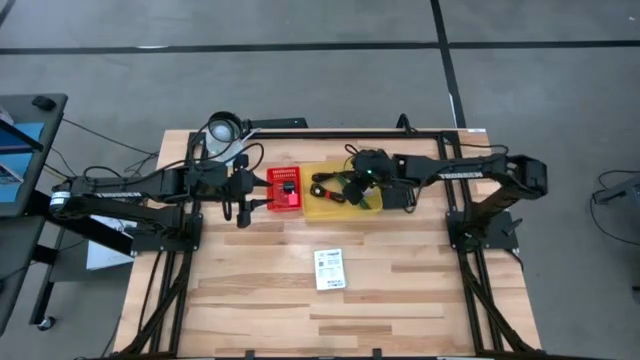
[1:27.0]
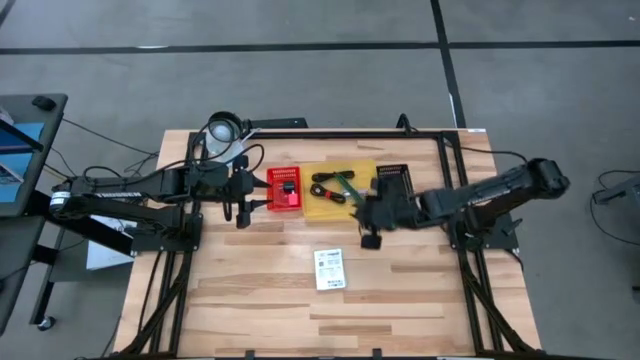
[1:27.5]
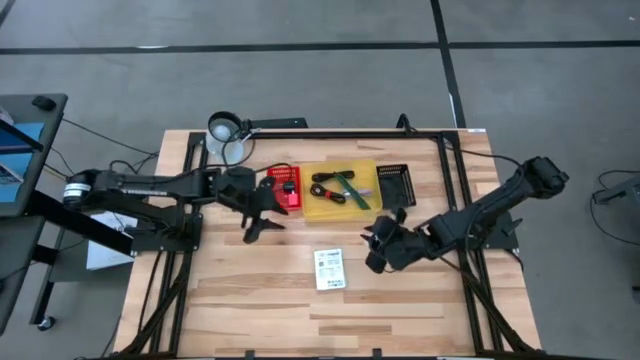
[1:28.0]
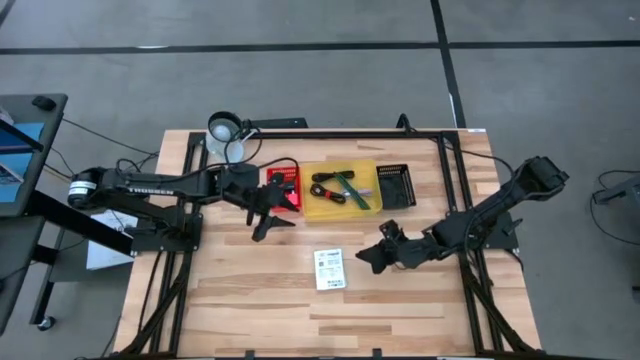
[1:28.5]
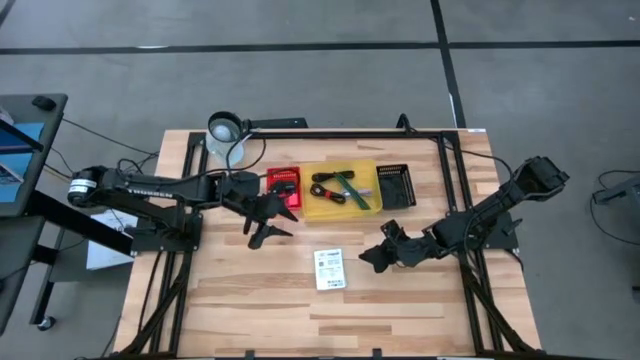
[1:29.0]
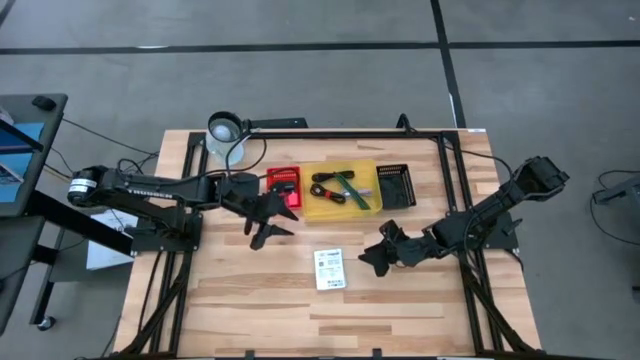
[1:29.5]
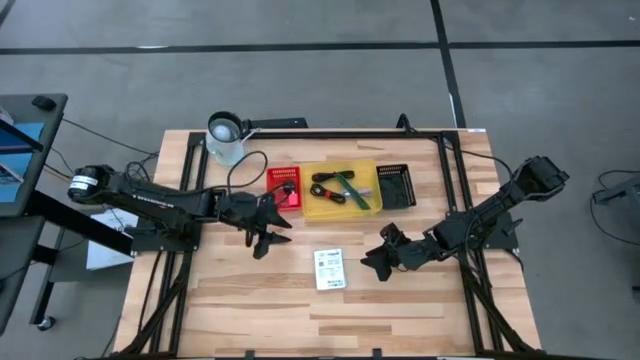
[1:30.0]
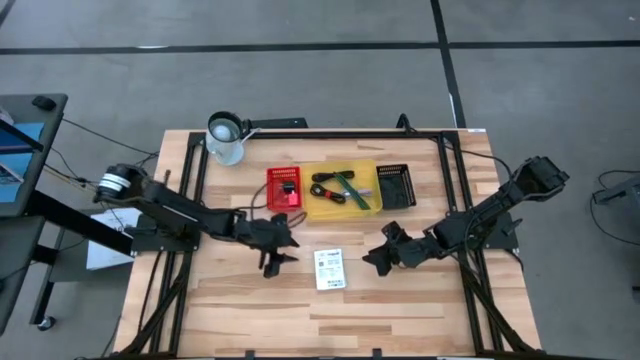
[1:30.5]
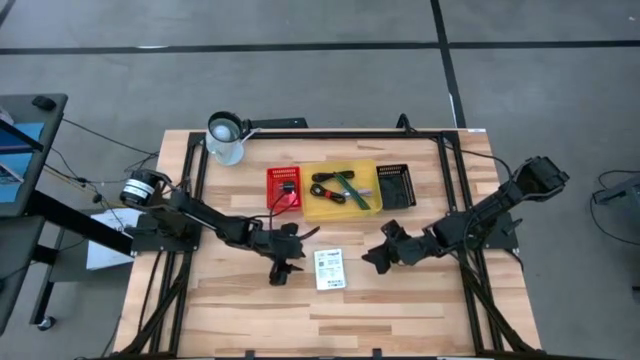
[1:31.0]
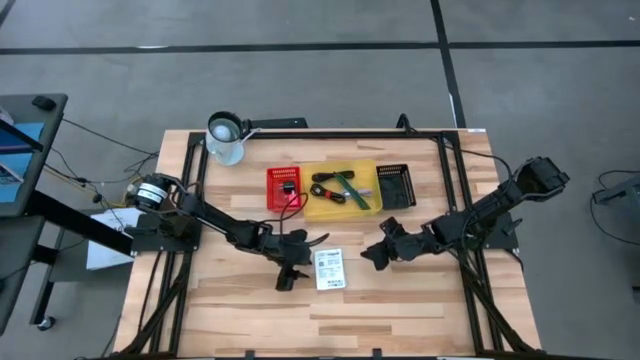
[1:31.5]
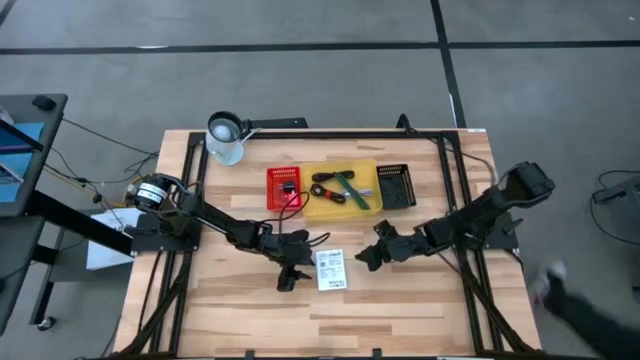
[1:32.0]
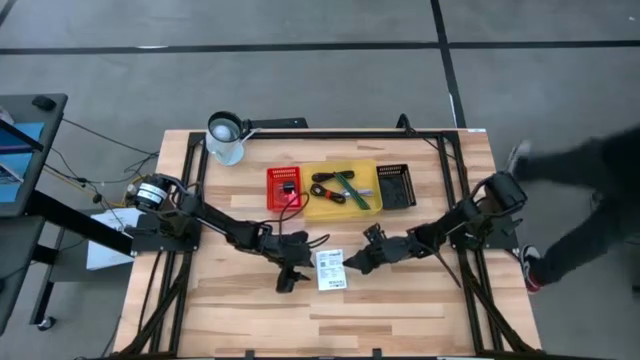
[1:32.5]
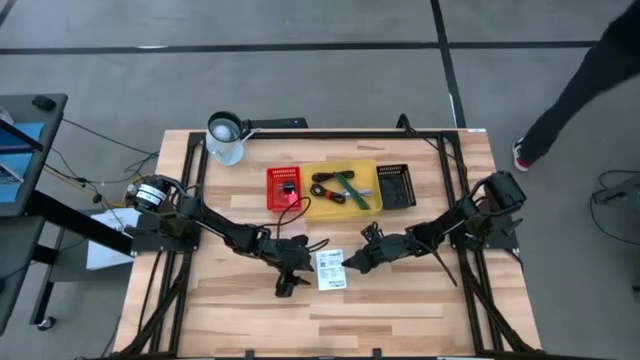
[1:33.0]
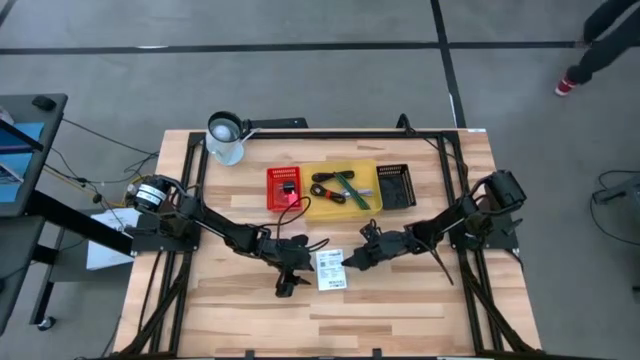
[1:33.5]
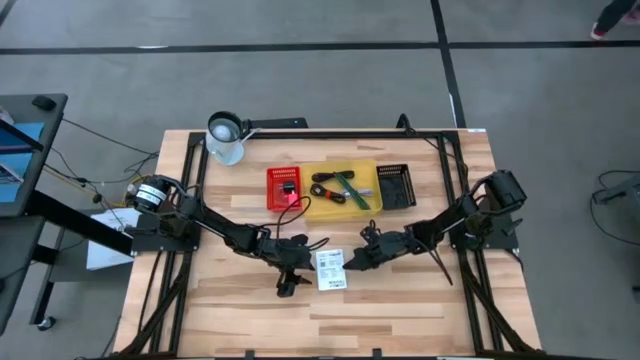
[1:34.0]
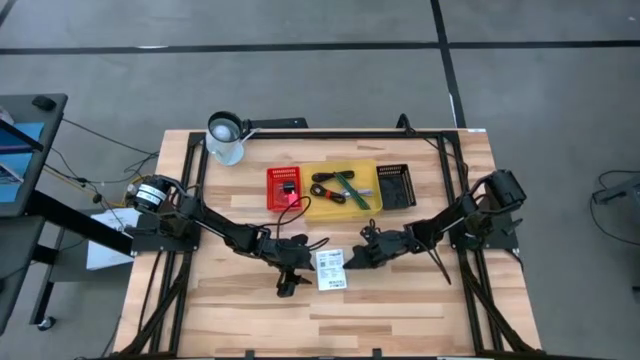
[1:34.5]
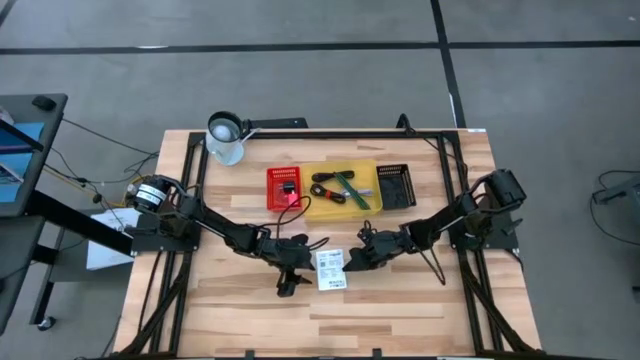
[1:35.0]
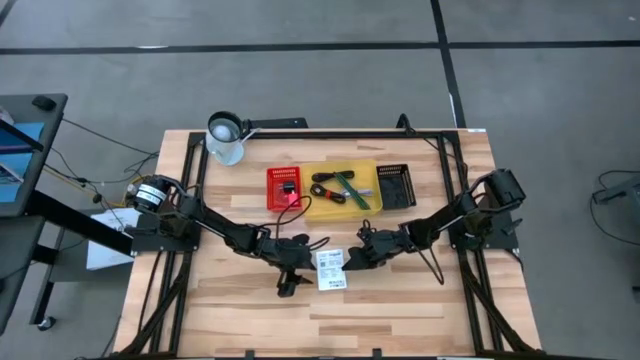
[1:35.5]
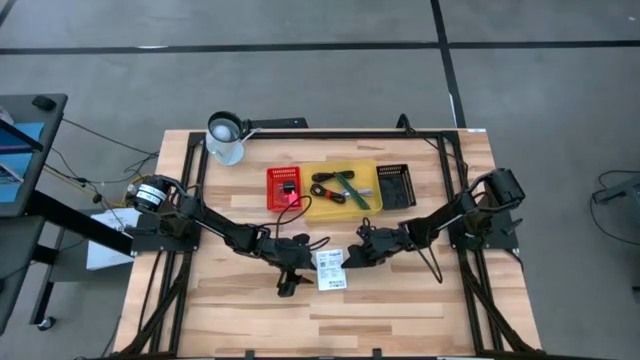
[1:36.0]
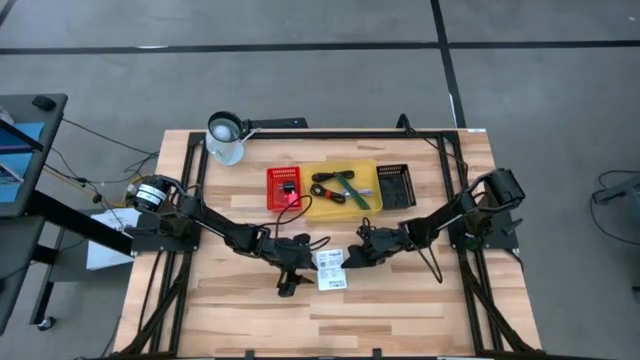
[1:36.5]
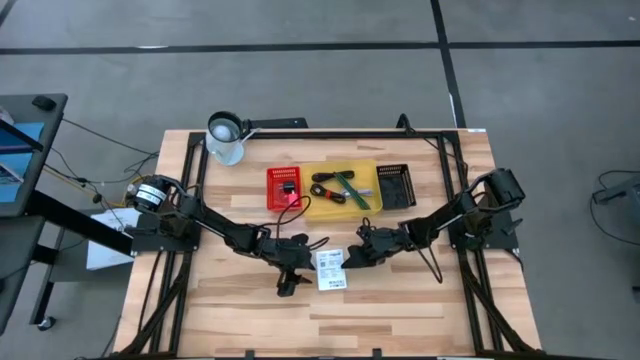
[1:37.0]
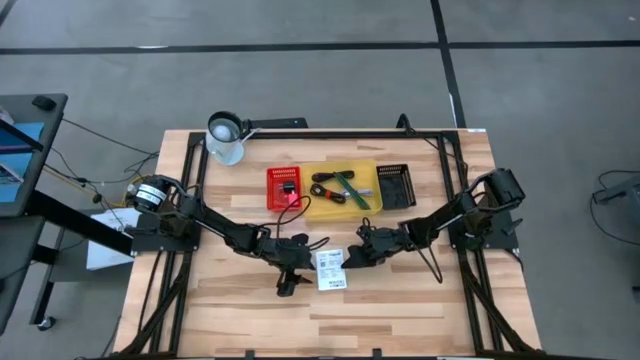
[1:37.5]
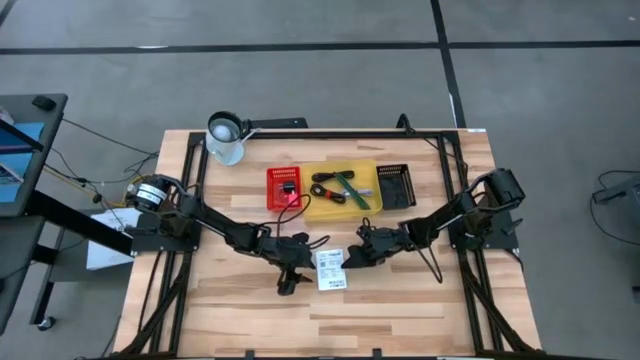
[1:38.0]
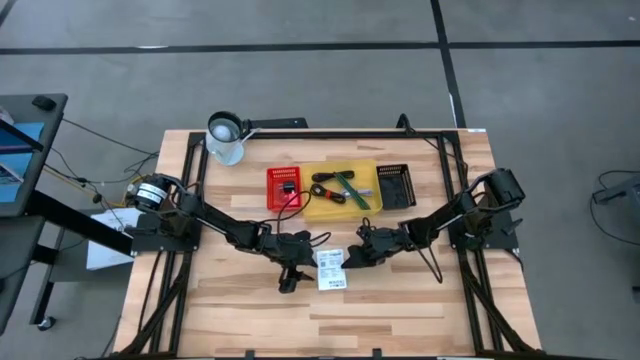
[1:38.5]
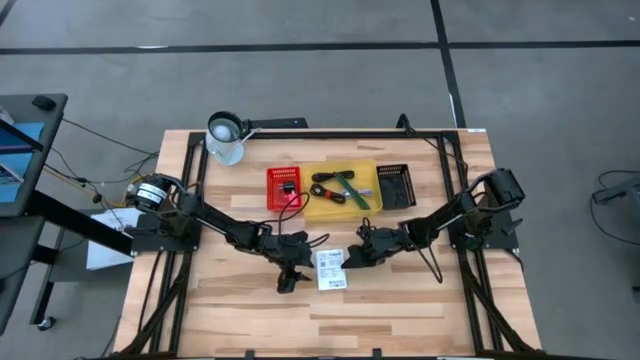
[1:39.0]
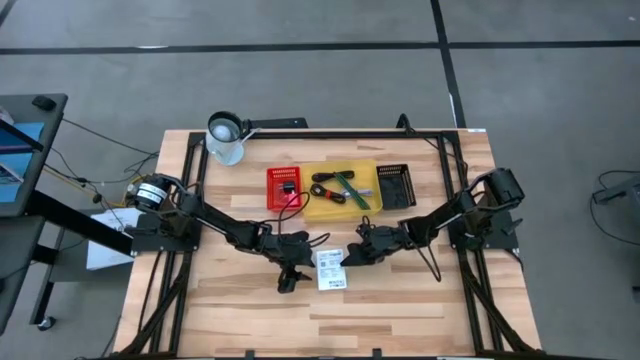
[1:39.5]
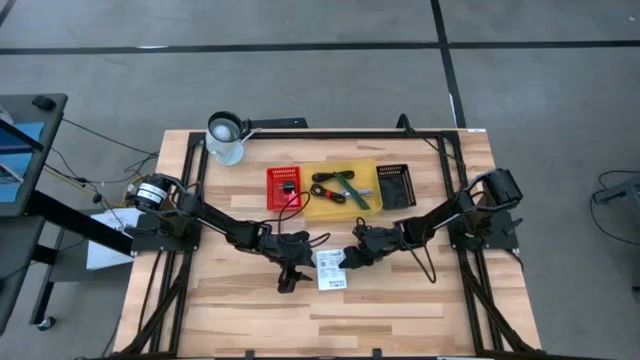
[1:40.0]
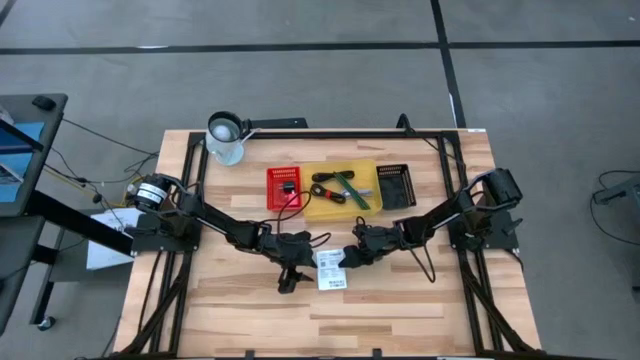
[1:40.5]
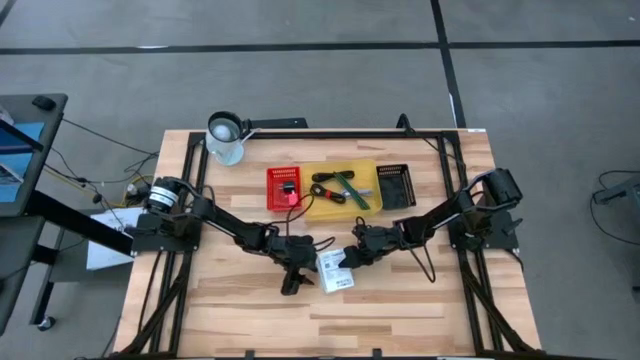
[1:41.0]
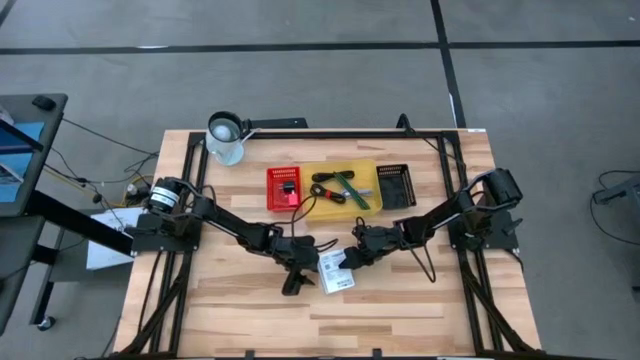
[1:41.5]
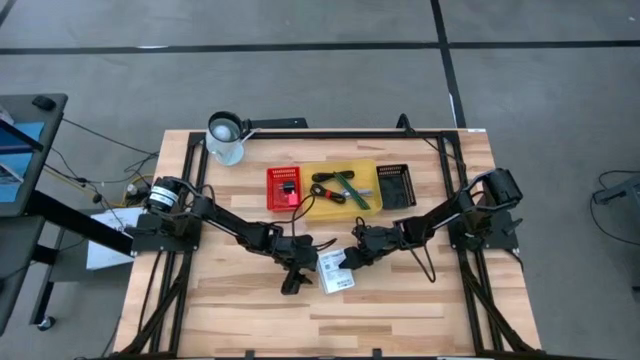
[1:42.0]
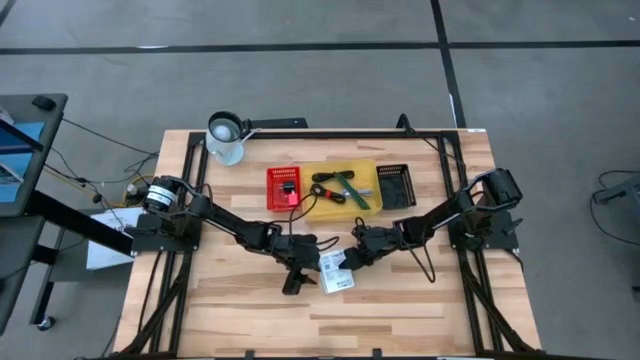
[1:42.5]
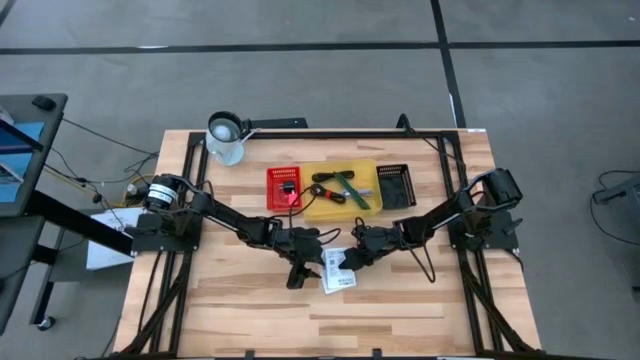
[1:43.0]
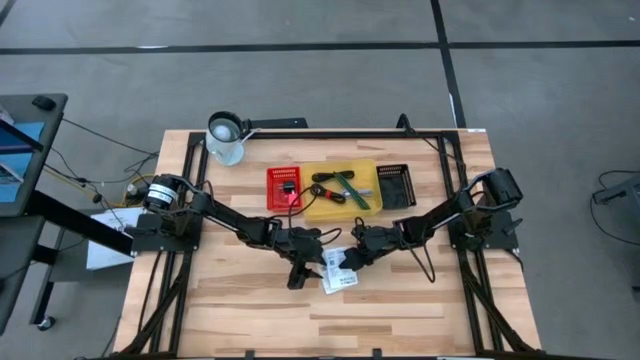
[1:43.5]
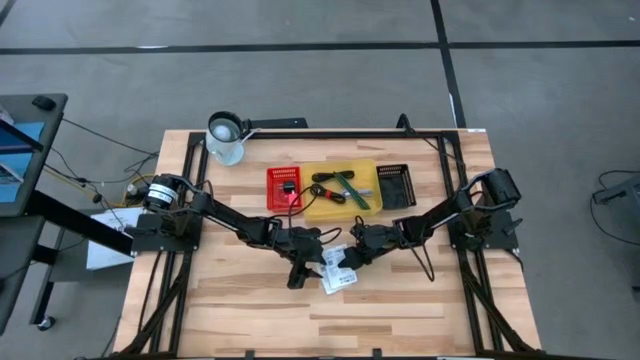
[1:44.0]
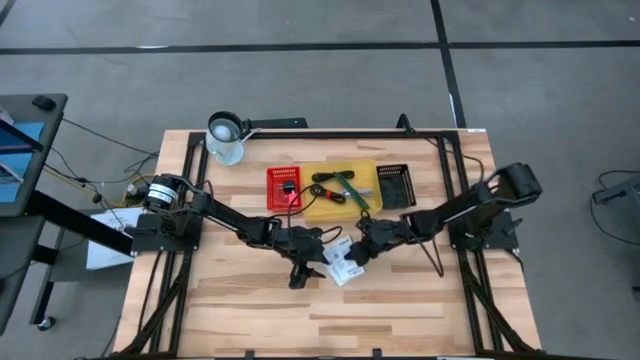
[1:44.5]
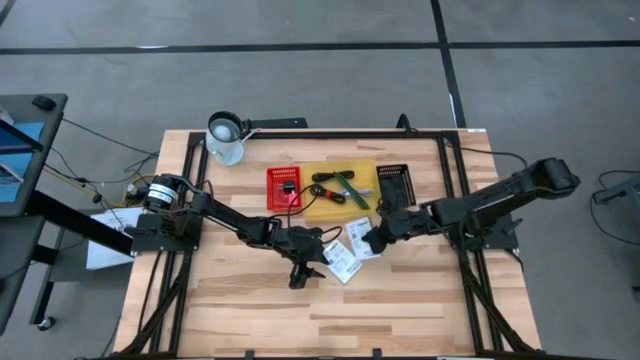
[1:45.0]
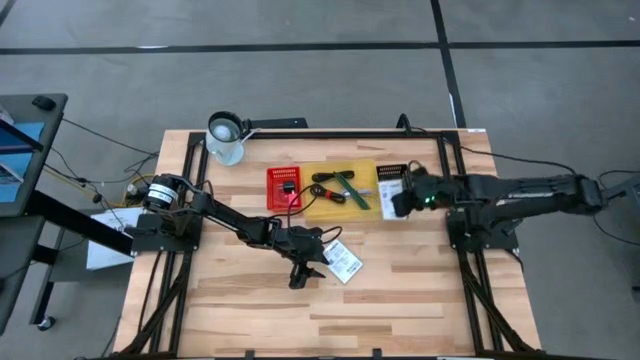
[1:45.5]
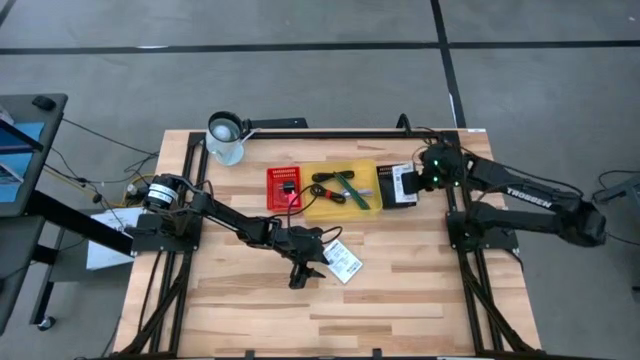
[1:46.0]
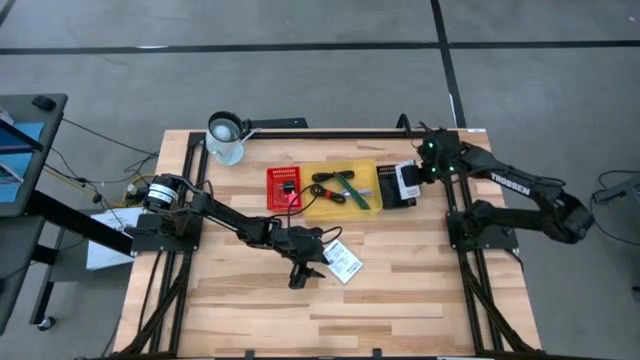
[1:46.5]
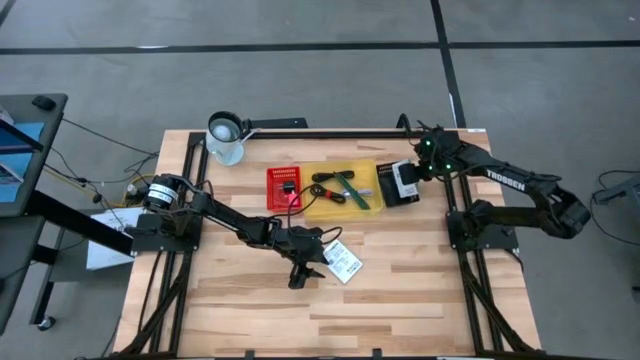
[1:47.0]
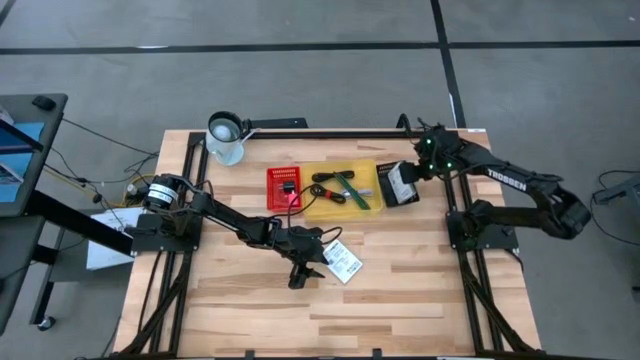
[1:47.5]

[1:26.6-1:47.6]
Task: Pick and place items into bin
Put the white card reader box into the black bin

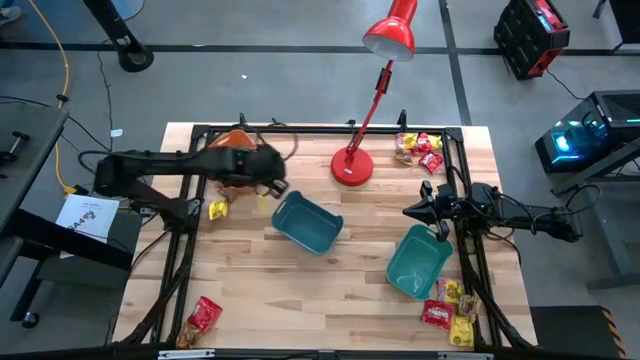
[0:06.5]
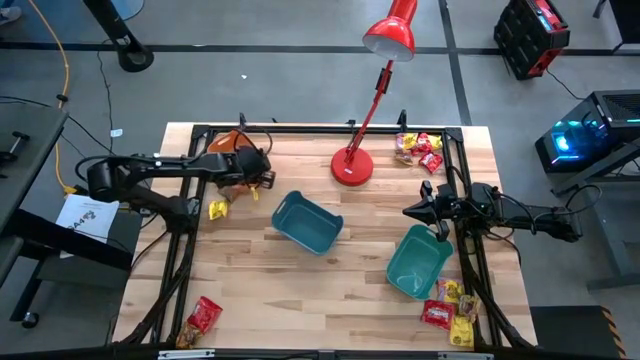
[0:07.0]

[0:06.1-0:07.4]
Task: Sort candy
Move the orange bin to the top left of the table

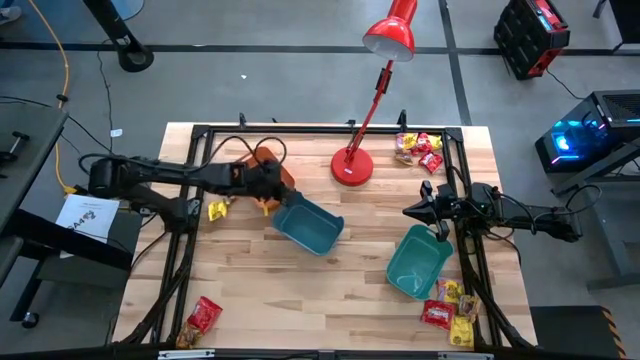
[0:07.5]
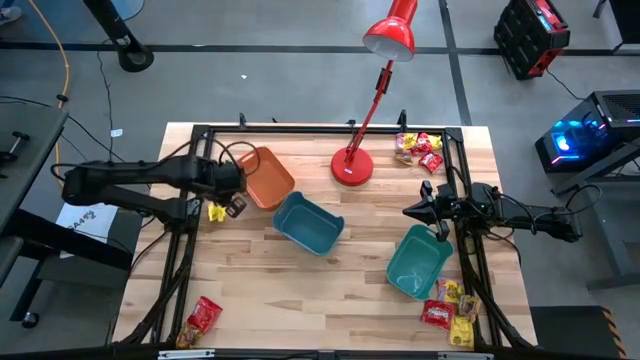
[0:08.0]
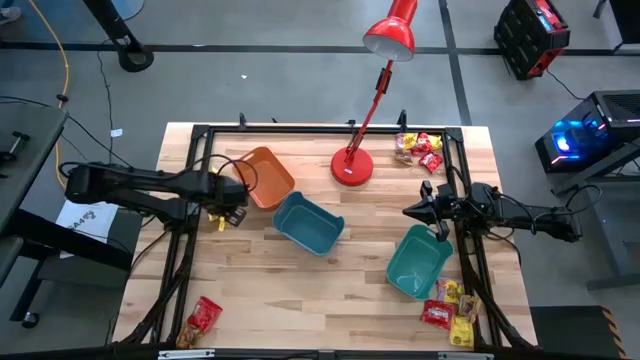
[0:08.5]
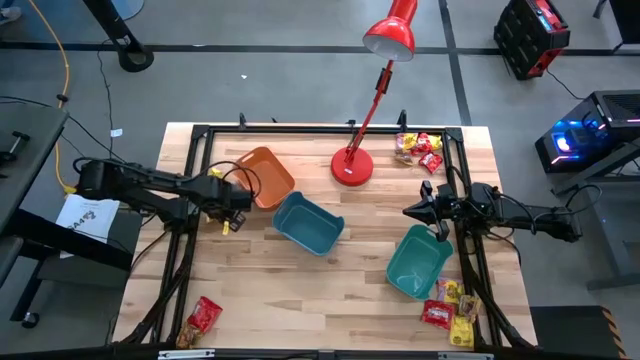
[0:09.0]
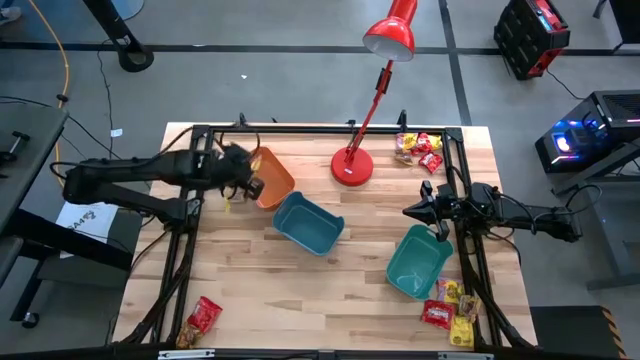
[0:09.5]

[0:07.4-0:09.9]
Put the top left yellow candy into the orange bin
